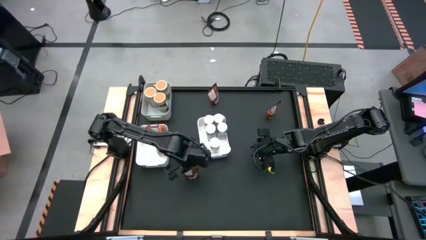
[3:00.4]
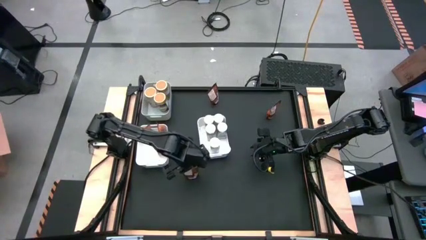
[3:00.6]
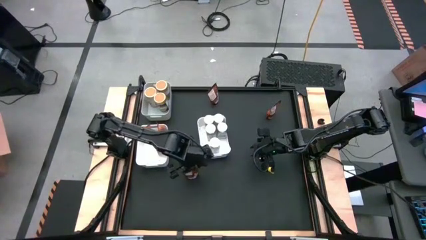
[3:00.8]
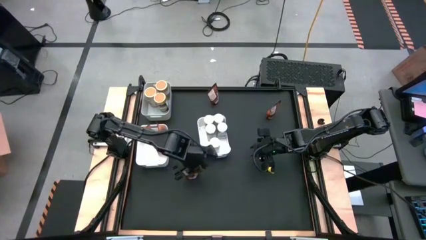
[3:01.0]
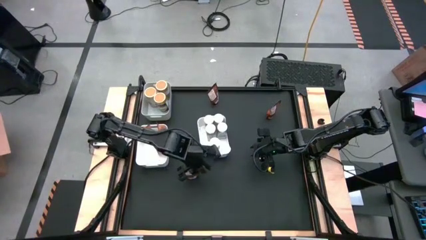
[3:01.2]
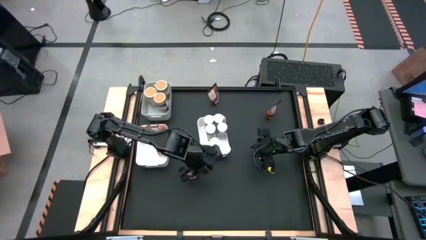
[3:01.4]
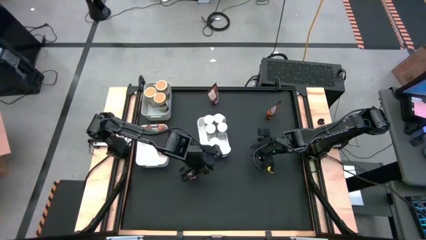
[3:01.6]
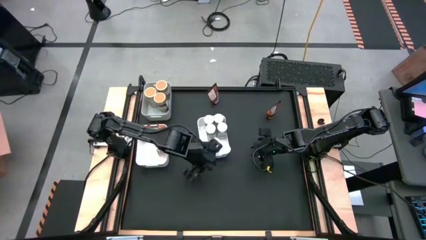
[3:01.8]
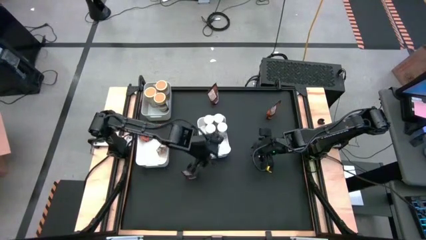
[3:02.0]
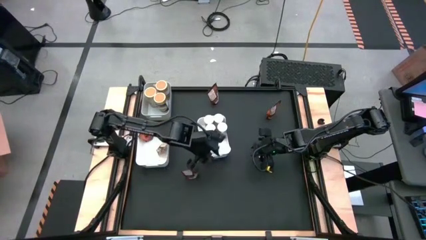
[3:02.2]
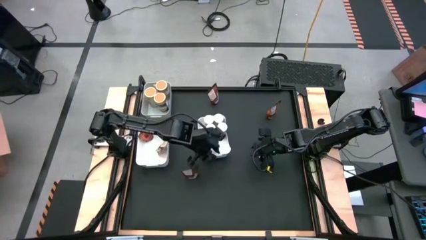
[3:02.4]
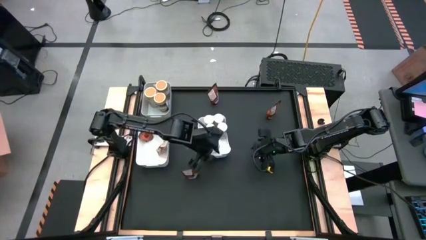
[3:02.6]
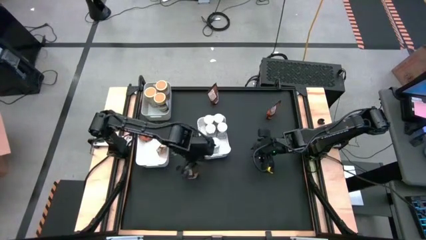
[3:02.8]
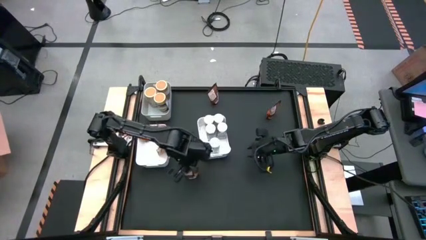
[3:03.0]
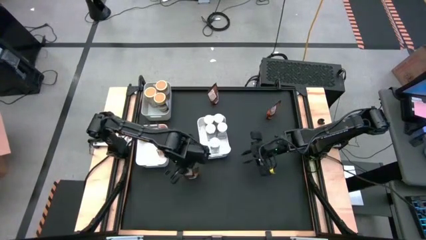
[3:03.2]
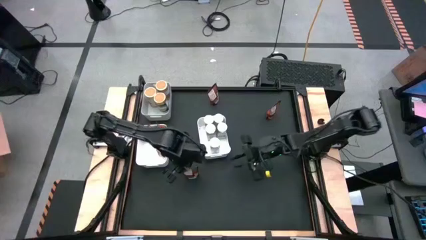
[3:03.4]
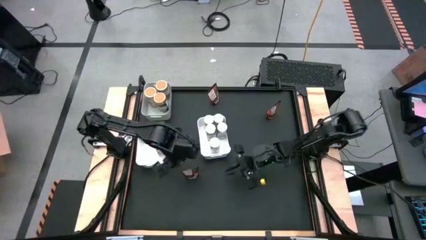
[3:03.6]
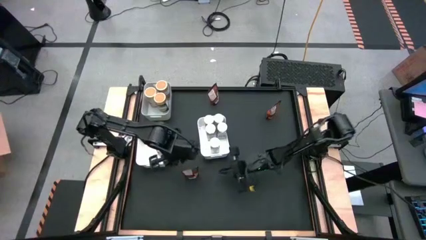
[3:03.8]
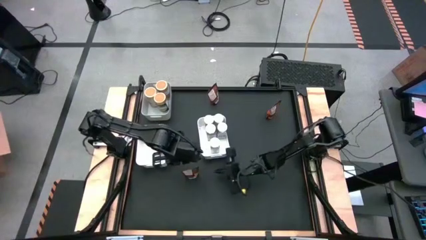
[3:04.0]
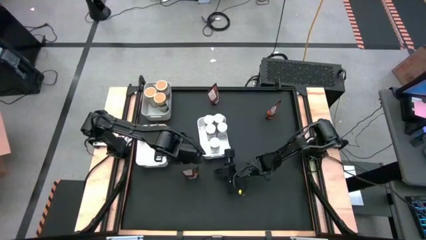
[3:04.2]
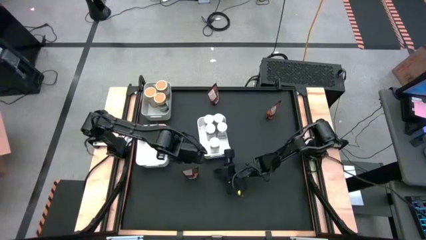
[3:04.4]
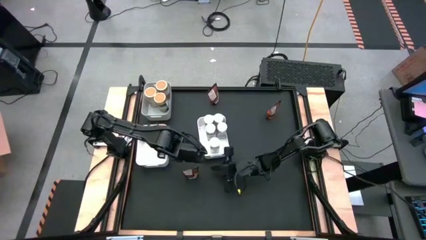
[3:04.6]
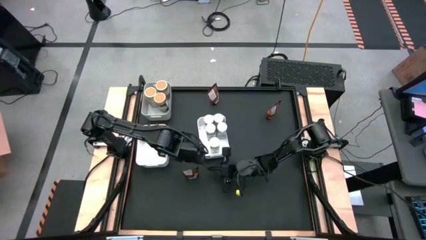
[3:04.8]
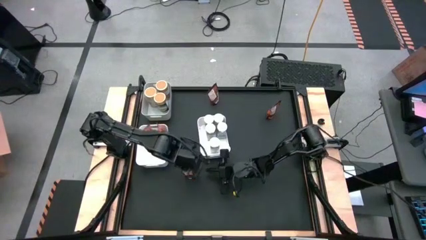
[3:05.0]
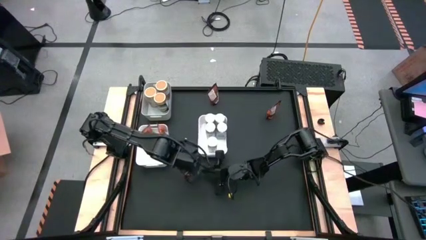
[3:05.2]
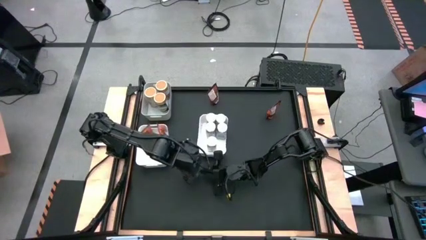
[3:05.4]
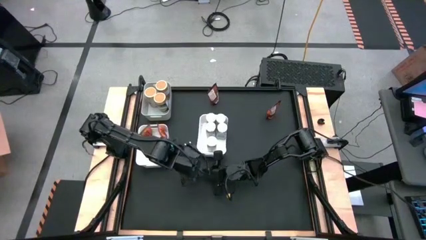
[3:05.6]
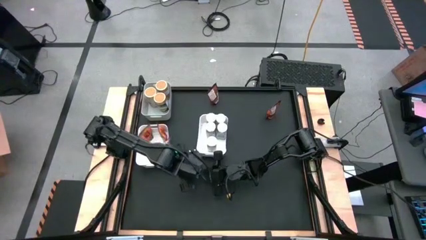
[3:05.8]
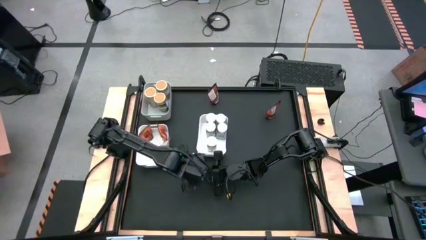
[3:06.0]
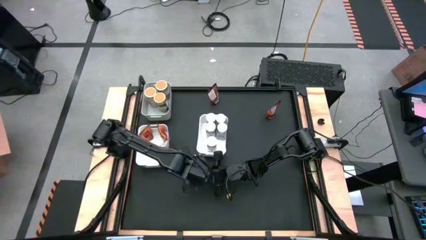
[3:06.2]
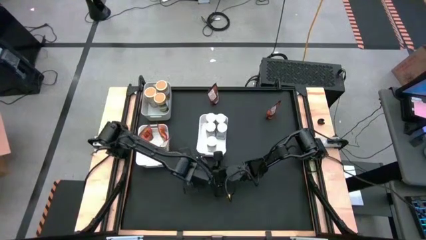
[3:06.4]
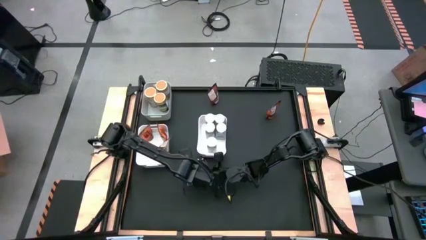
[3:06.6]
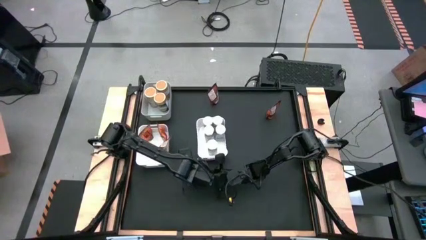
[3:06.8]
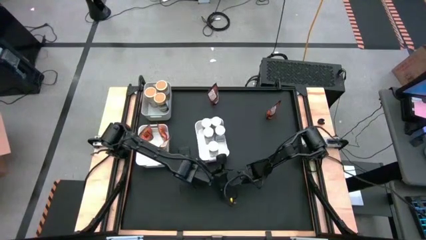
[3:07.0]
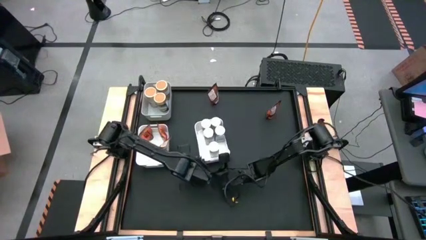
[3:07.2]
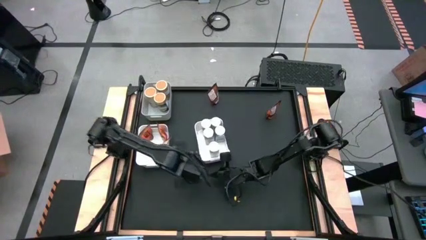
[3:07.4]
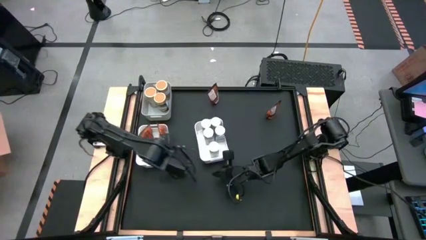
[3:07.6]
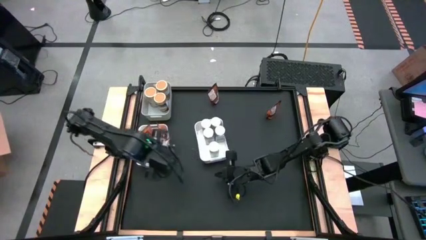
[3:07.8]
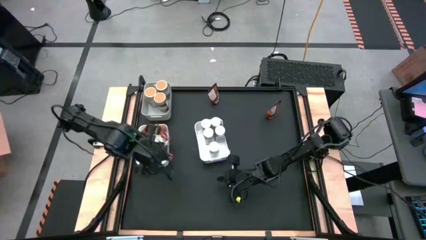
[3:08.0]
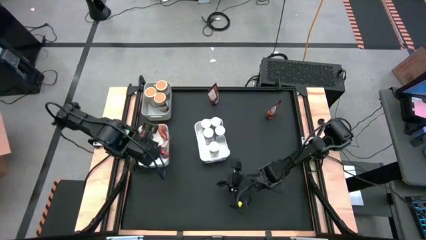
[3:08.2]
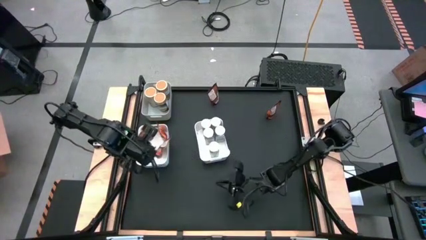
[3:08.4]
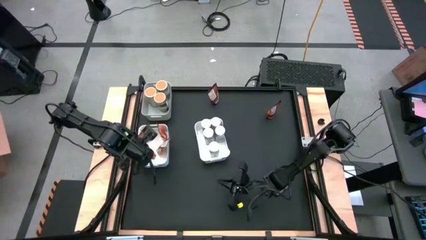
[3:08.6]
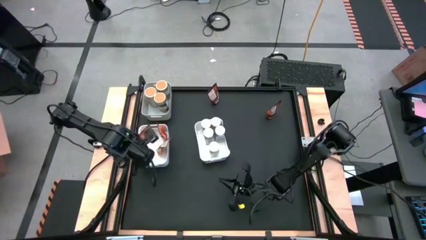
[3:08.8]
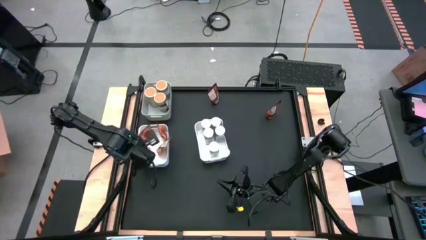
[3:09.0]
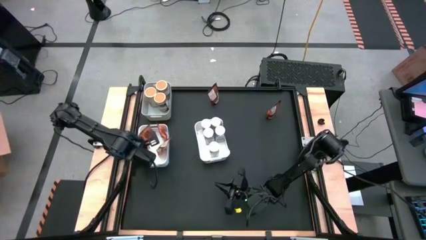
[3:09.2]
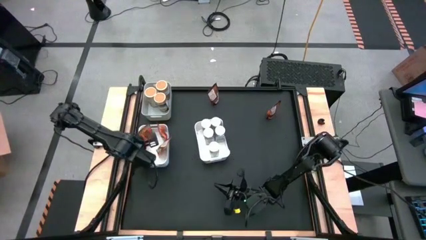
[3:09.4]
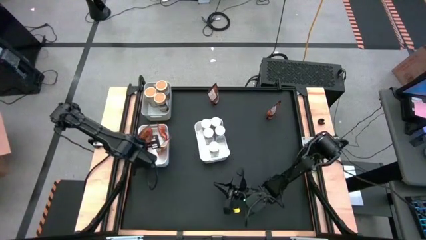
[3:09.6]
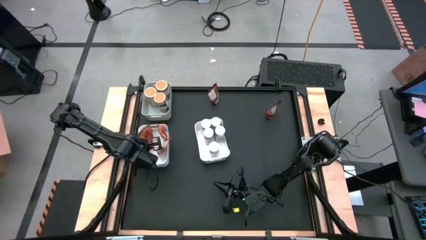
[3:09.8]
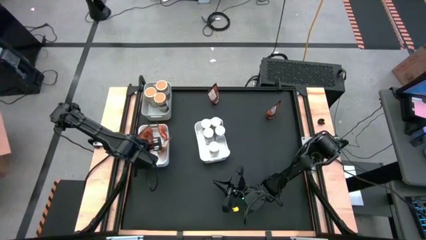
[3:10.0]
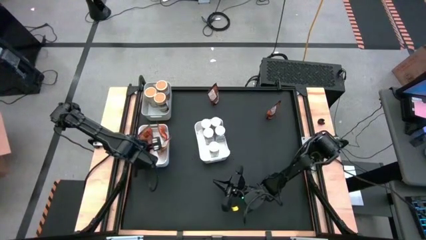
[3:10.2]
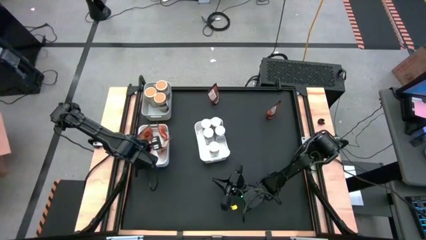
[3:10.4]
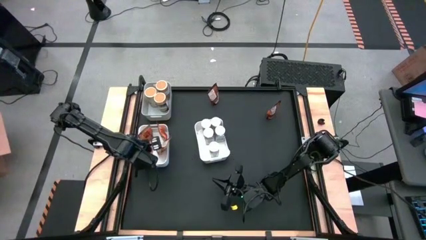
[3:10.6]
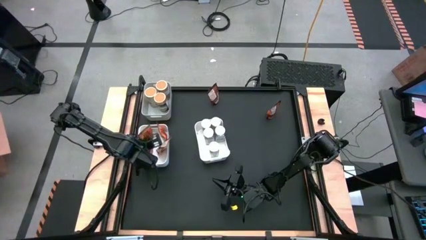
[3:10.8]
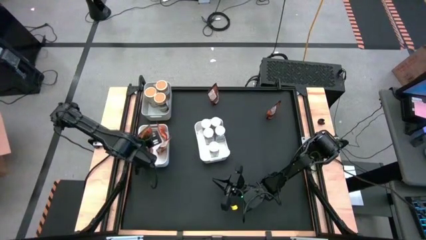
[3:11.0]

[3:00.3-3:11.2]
Task: Sort spices by type
Put the orange seasoning pack into the left white bin

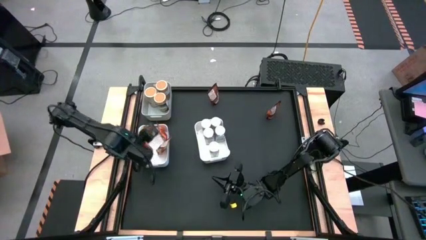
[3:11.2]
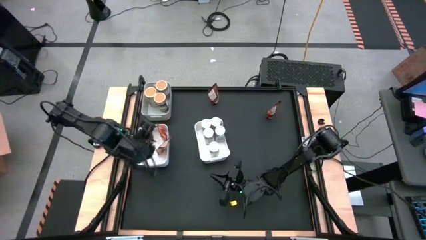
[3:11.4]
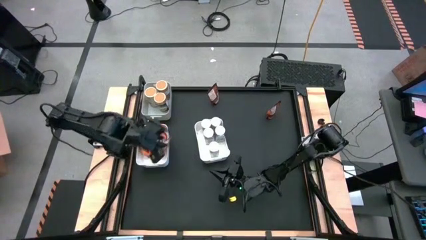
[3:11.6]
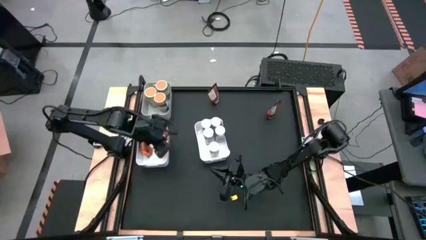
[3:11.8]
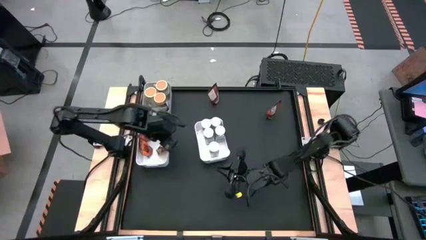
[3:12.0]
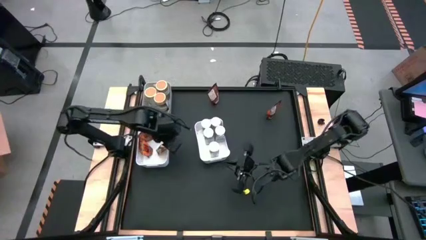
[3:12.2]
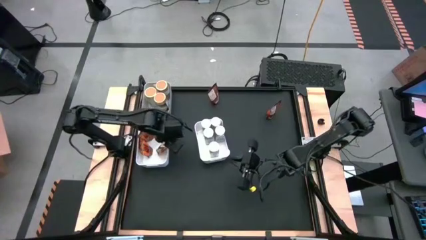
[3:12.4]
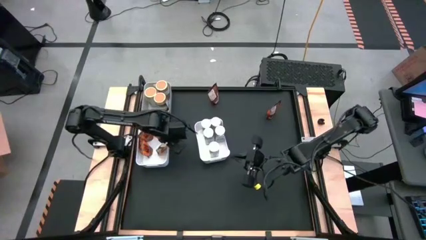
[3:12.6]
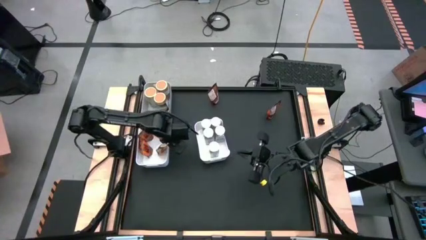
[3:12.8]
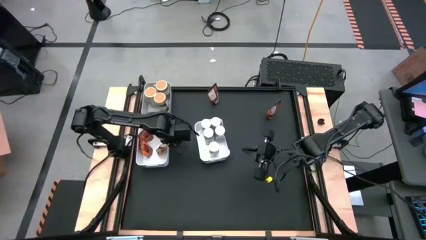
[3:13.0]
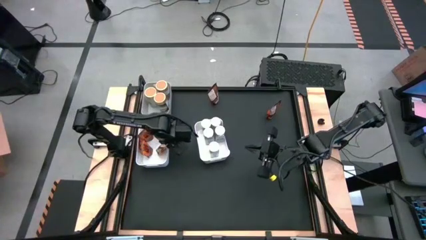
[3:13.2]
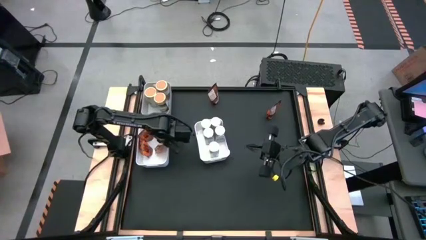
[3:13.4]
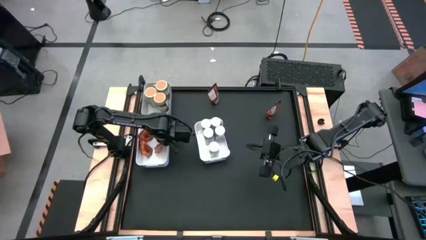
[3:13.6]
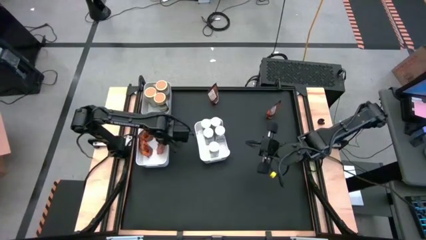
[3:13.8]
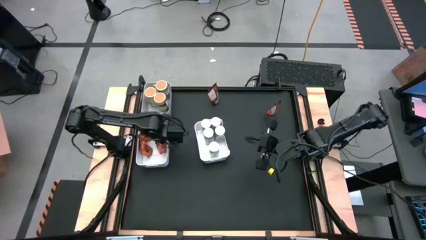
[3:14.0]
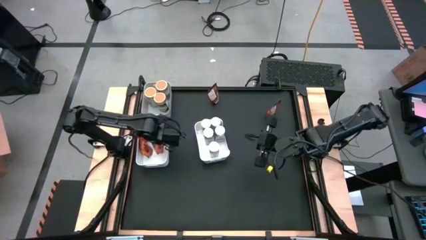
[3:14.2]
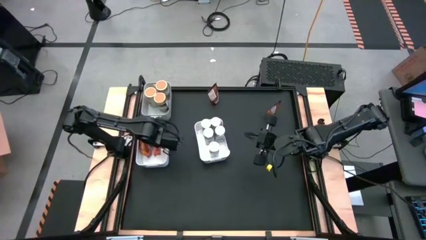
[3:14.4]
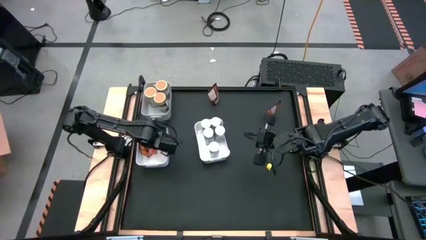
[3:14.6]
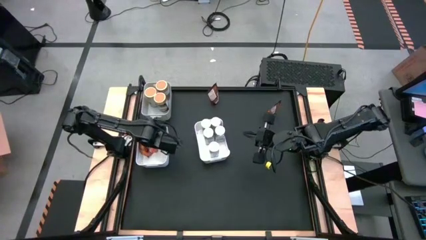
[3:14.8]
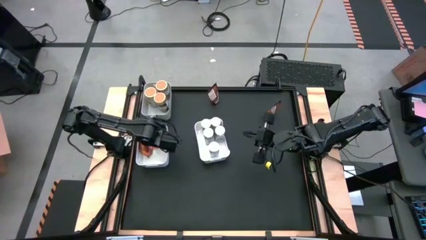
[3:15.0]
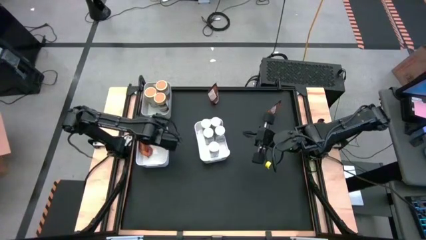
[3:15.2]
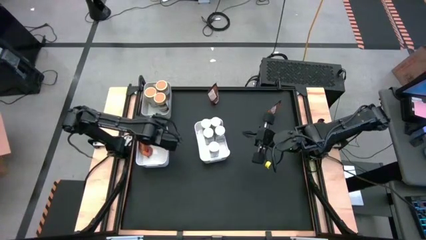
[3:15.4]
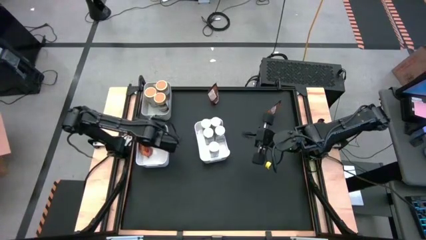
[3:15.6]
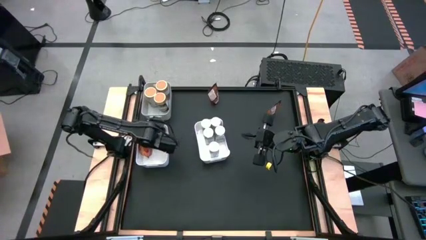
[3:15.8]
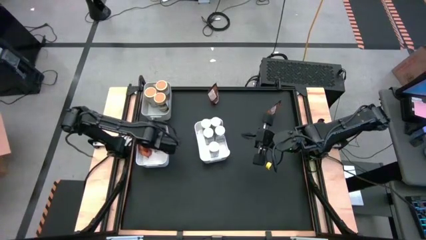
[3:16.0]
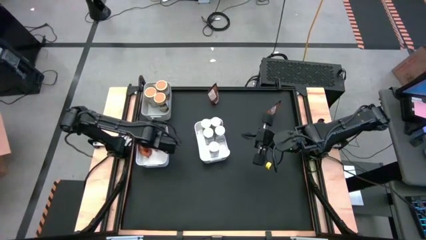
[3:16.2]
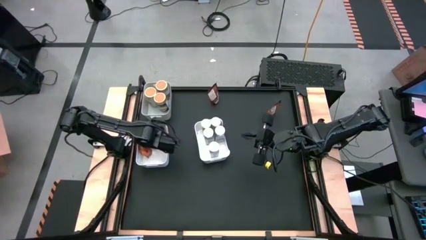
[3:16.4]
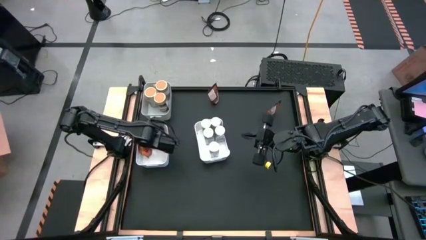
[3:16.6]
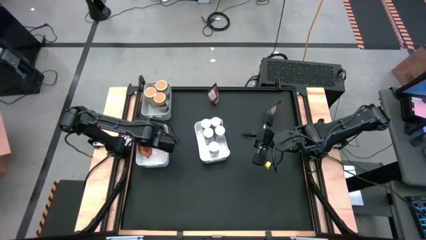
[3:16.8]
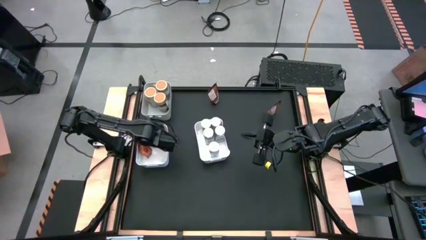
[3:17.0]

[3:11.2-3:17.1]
Adjust the orange seasoning pack into the left white bin
